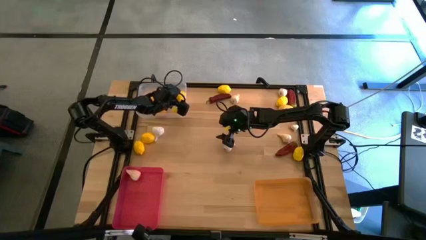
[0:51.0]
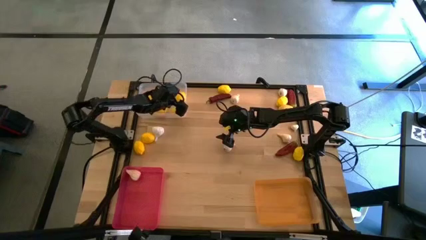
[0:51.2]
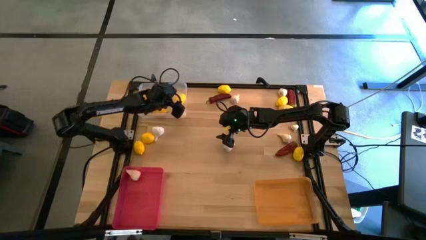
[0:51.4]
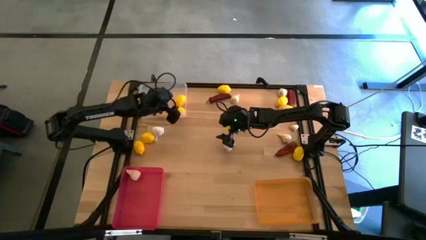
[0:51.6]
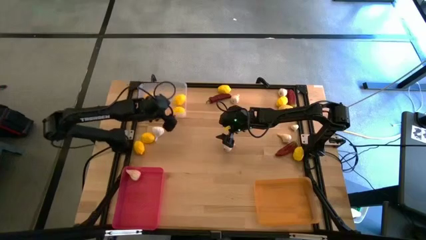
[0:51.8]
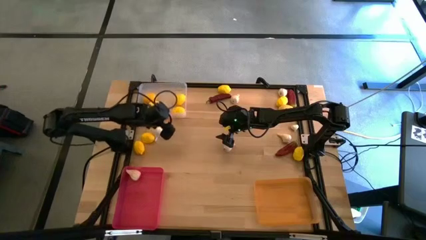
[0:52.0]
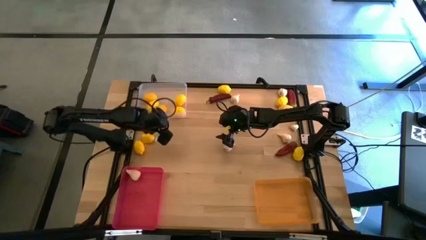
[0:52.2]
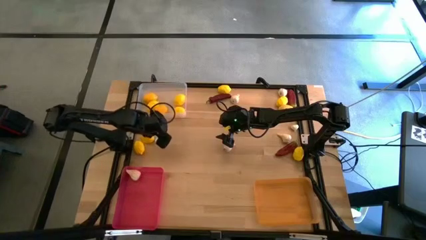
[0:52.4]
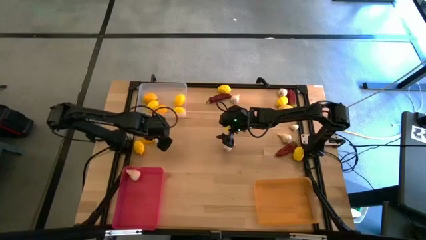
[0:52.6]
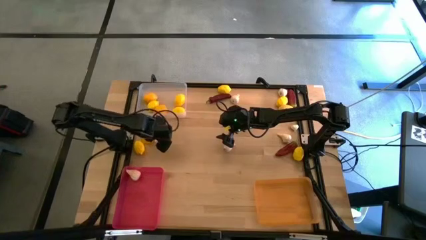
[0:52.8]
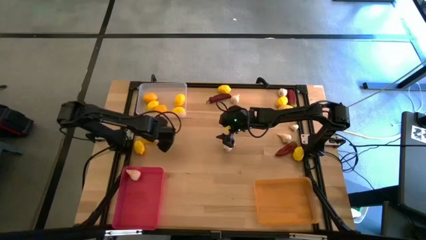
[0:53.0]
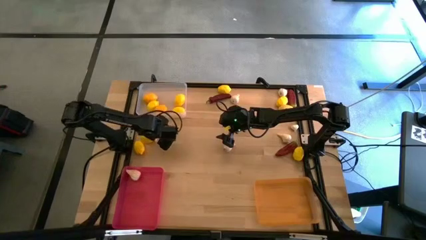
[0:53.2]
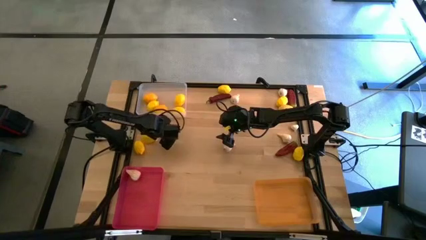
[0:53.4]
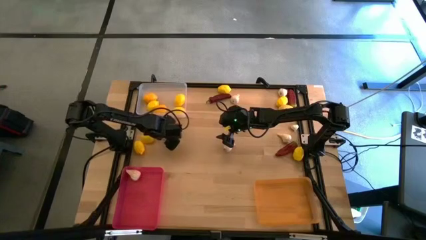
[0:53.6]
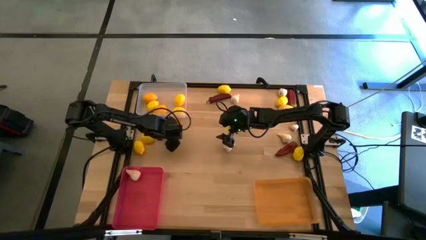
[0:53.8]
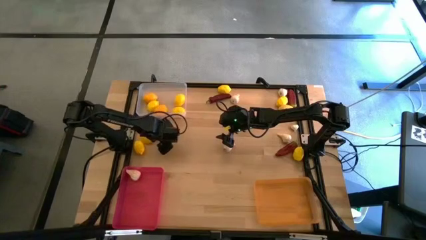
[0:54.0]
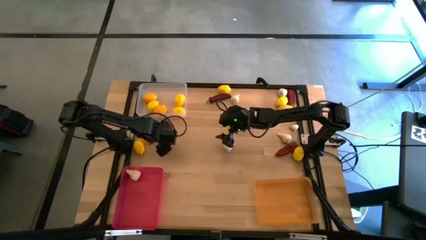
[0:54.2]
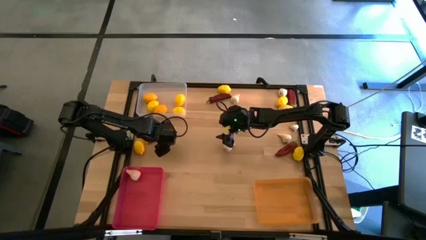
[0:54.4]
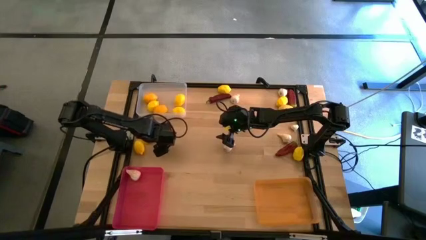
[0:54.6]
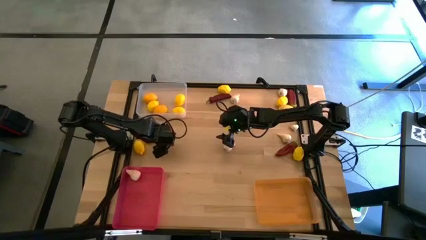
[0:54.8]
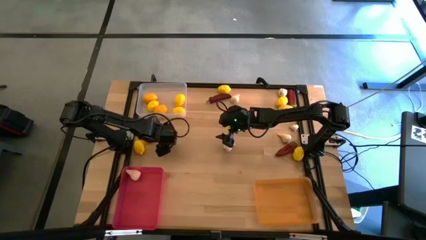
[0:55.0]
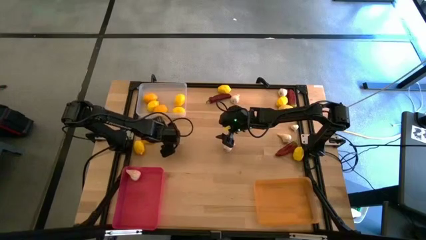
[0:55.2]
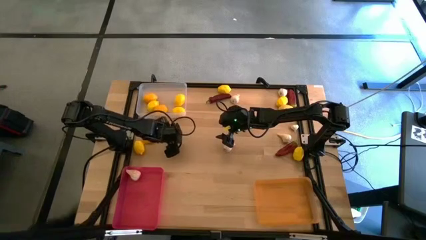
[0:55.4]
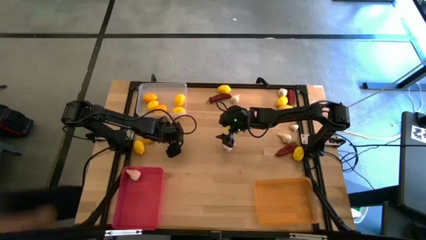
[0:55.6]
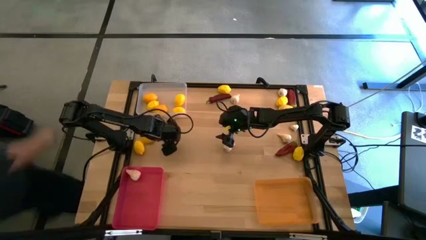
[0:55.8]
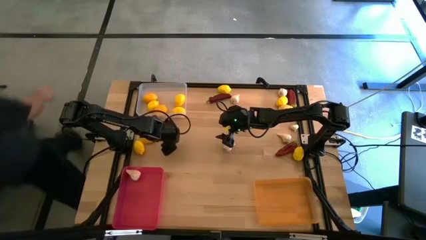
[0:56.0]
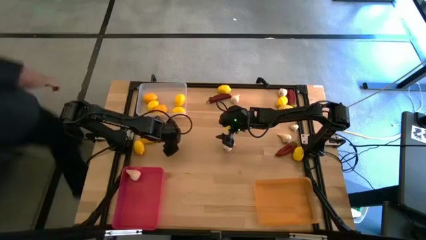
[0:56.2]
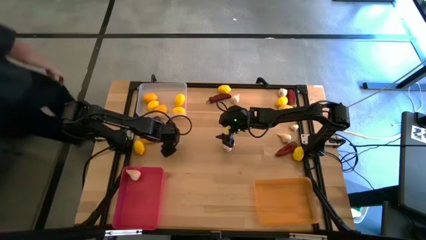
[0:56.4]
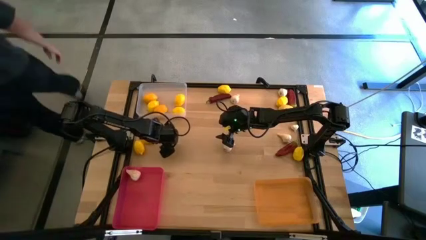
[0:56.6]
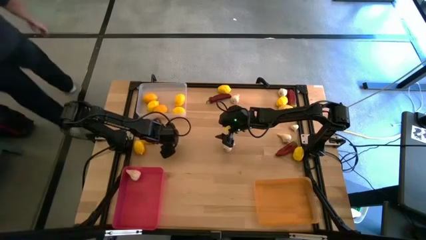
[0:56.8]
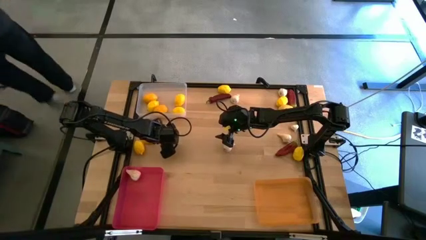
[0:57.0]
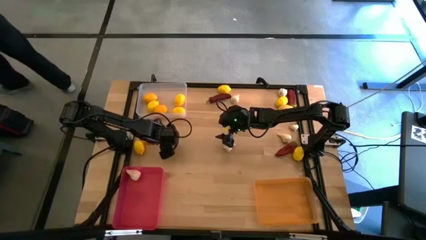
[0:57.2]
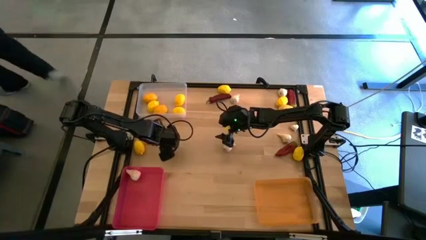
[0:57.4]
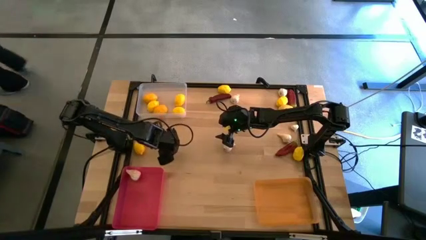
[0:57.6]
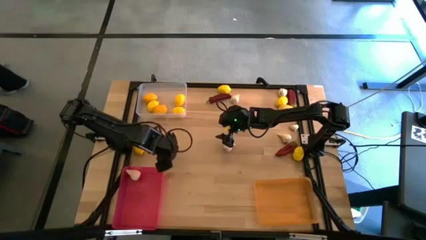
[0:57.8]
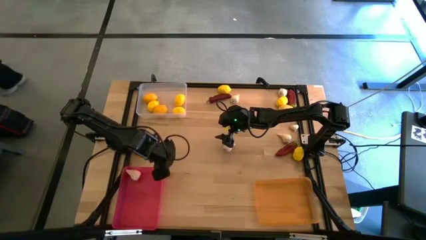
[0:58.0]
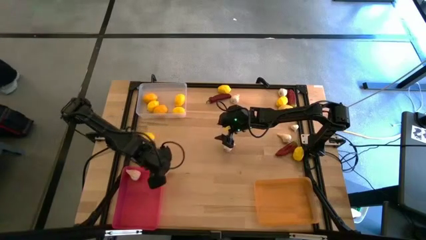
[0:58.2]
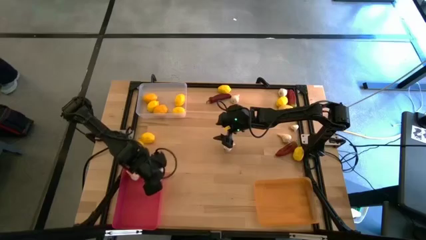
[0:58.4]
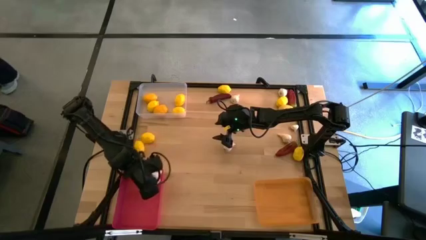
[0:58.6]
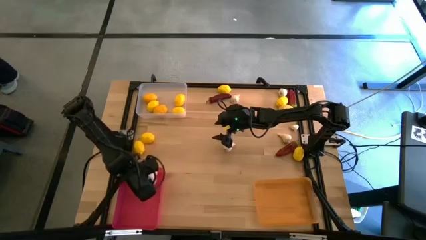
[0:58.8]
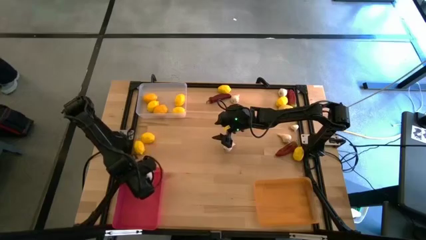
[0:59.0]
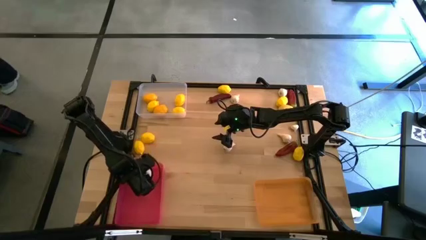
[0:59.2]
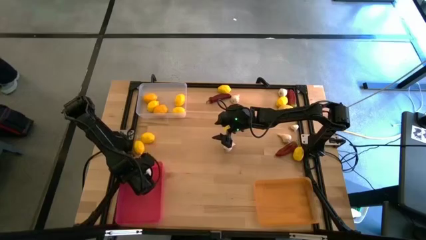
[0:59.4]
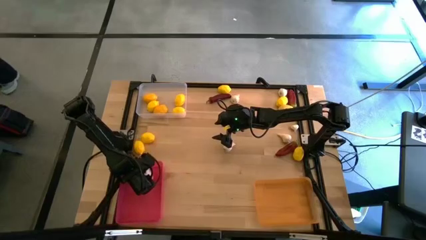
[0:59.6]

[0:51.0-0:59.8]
Task: Sort produce into baskets
Put the white garlic into the bottom left red bin

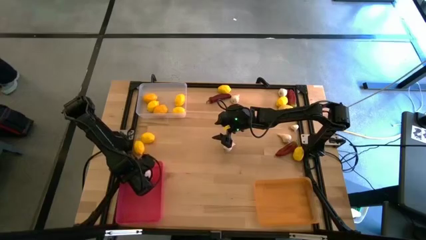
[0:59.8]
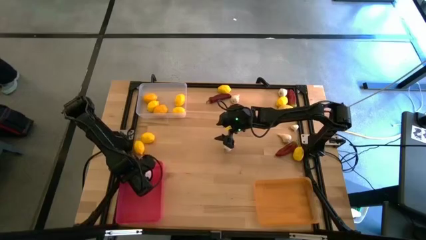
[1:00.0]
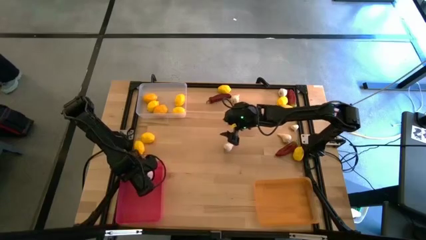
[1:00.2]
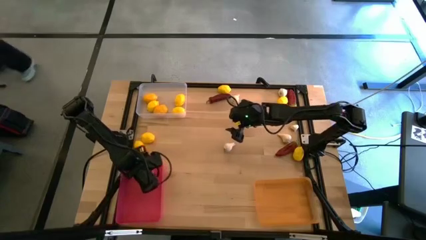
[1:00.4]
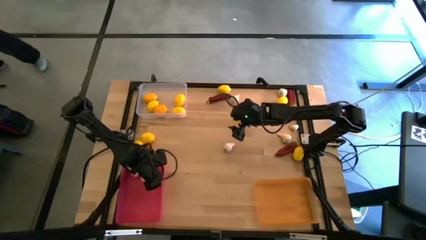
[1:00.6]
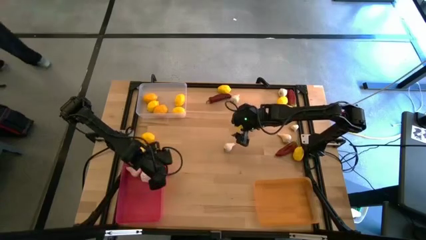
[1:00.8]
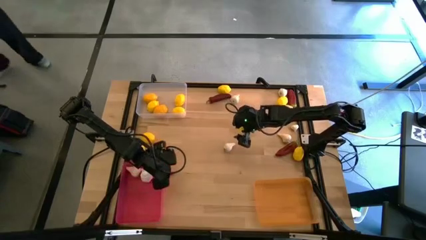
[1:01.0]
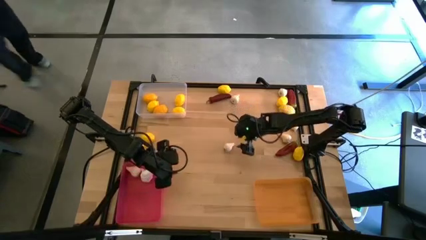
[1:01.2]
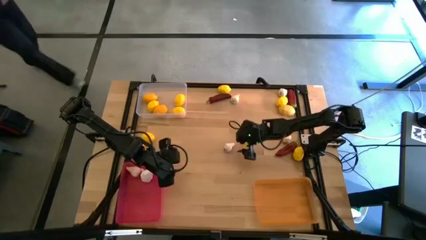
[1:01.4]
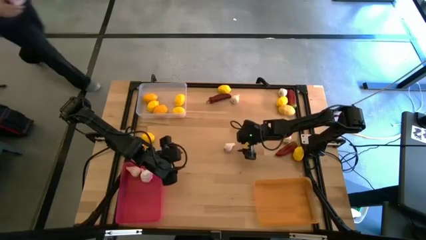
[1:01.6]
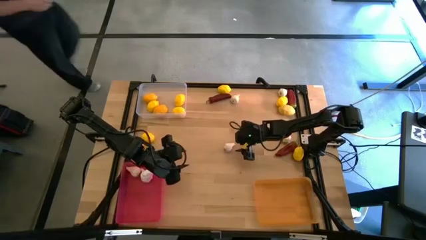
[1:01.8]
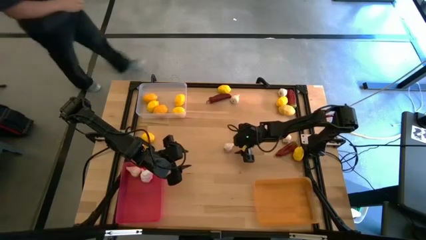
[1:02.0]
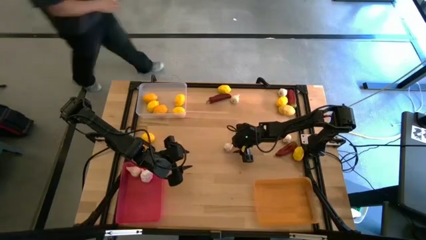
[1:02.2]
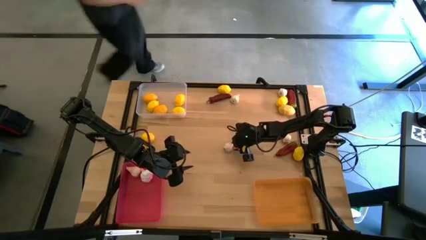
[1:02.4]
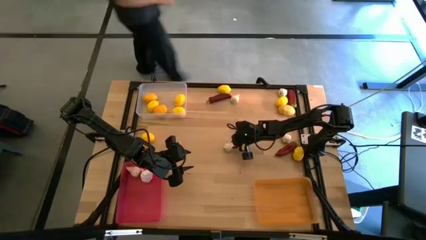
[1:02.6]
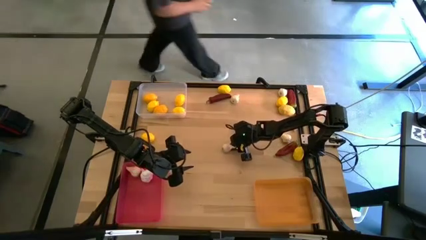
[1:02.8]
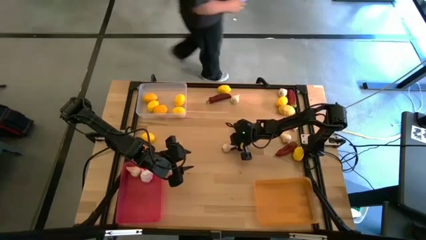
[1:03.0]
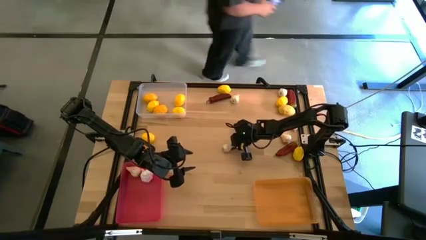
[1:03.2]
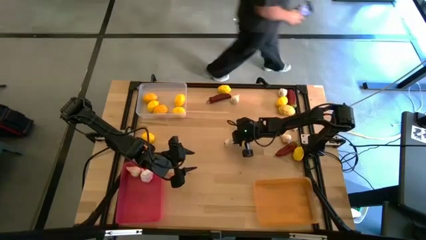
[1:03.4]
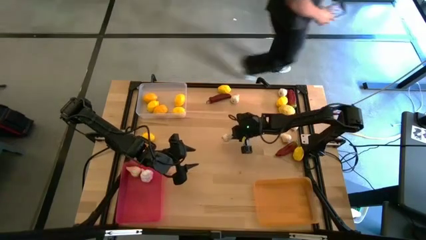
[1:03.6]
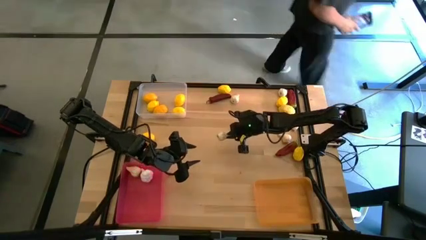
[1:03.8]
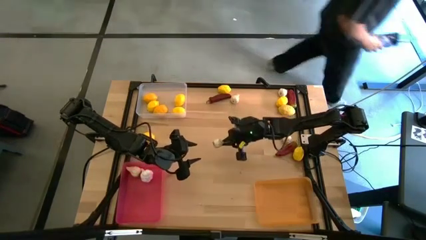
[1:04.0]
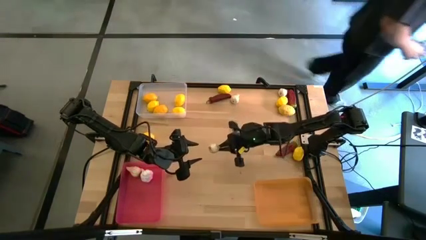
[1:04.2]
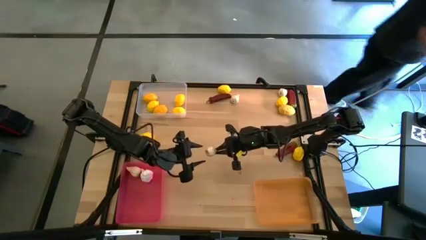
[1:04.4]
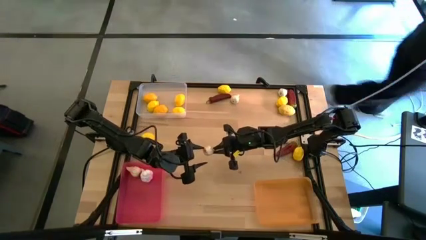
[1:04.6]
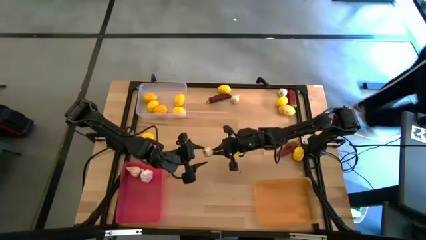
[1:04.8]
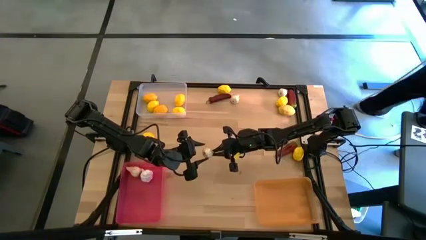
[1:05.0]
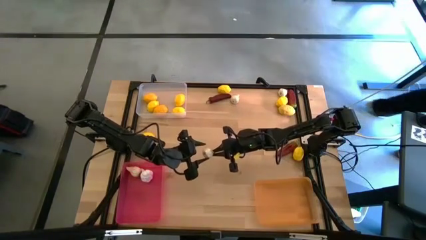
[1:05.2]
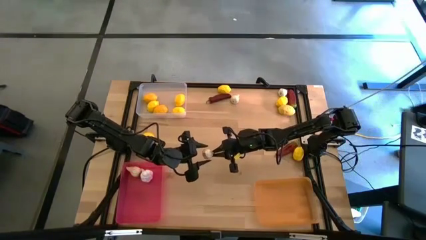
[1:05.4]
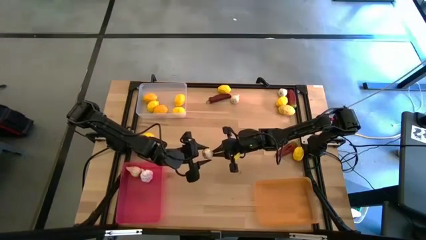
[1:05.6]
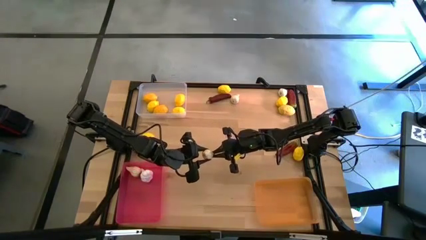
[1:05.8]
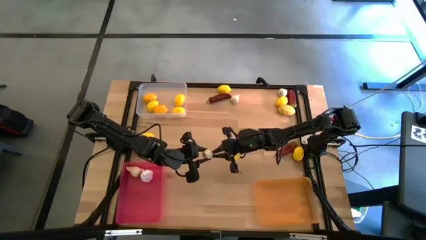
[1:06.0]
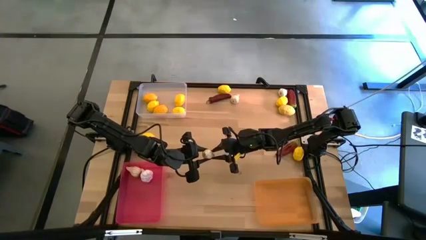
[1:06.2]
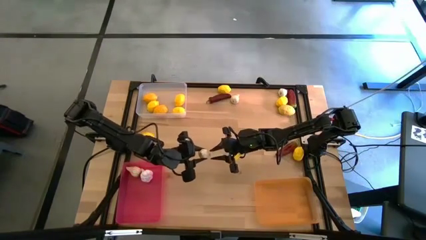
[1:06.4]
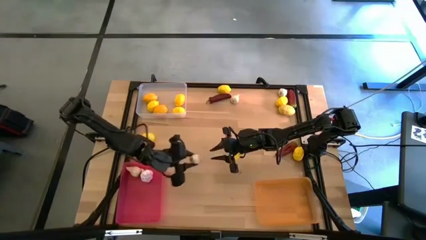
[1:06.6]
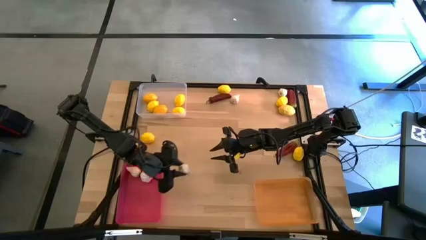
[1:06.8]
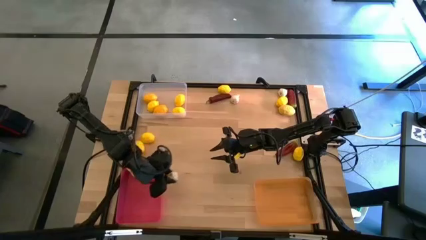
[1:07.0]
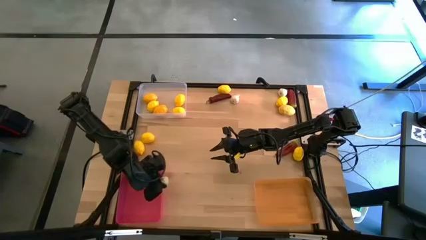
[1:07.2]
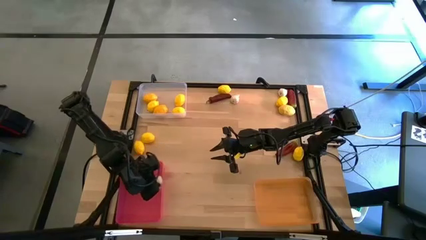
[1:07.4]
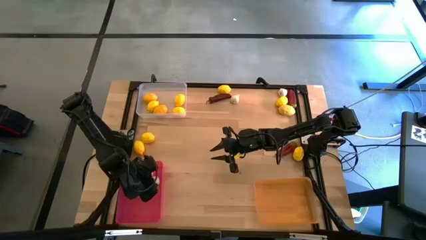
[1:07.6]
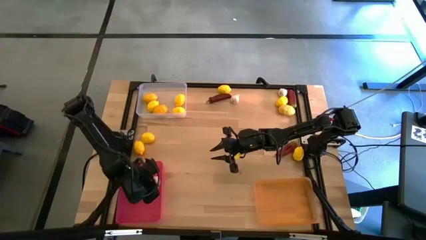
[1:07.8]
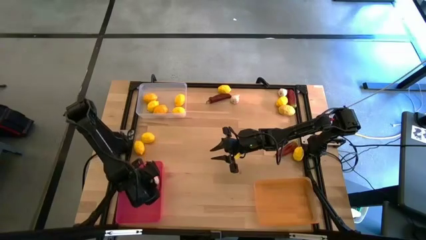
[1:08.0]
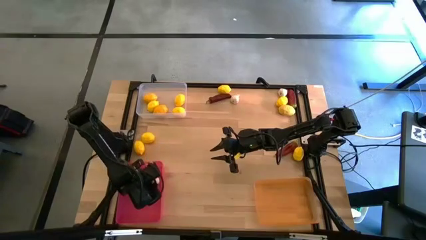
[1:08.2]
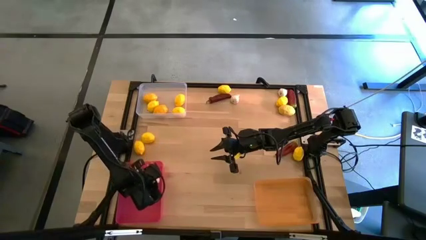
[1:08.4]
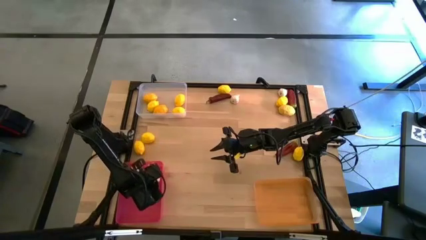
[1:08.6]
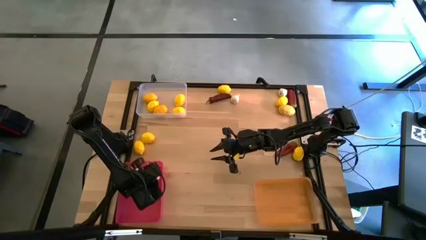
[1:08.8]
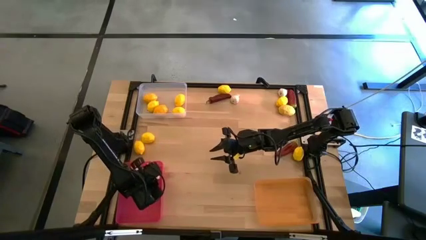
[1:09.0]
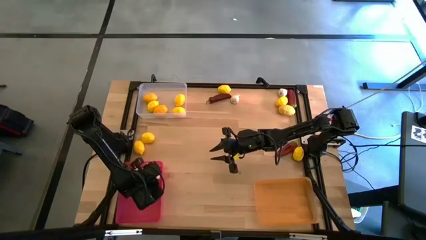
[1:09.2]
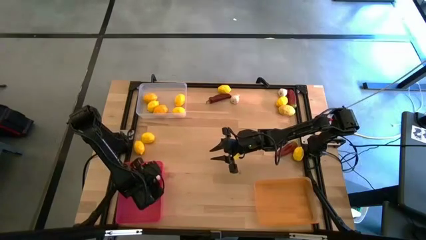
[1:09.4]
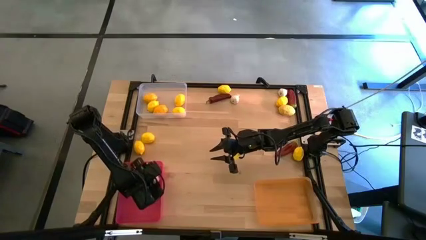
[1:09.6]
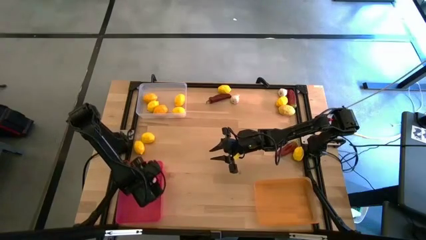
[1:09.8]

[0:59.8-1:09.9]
Put the white garlic into the bottom left red bin
